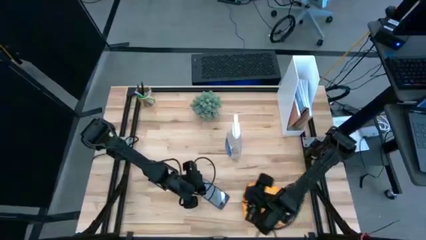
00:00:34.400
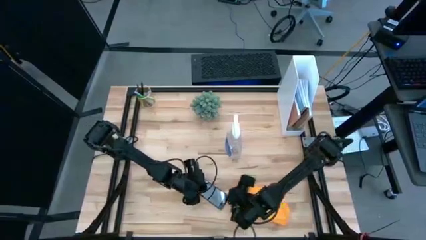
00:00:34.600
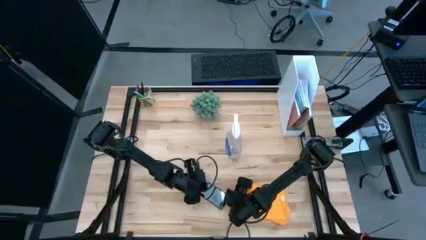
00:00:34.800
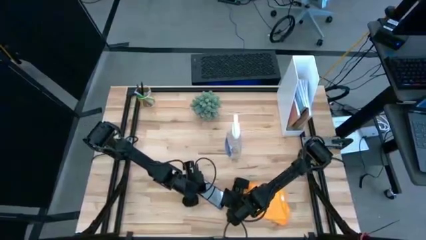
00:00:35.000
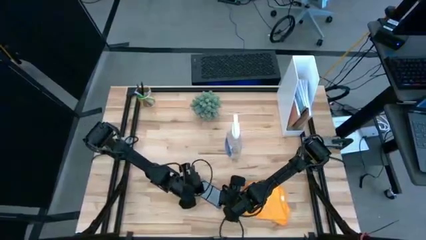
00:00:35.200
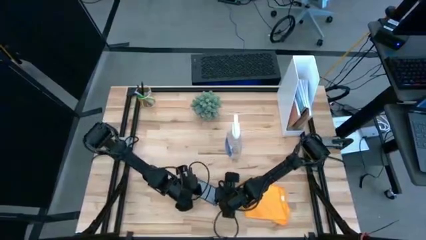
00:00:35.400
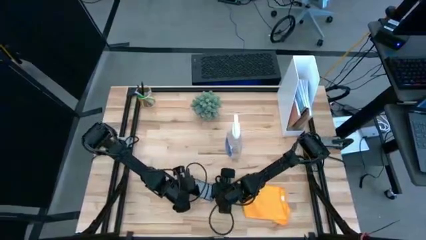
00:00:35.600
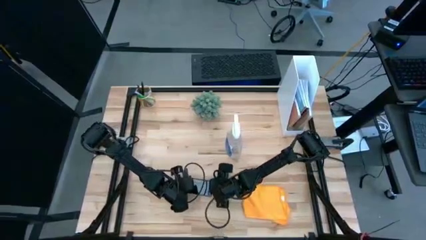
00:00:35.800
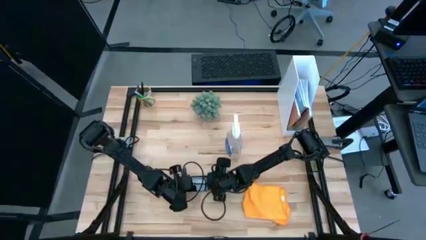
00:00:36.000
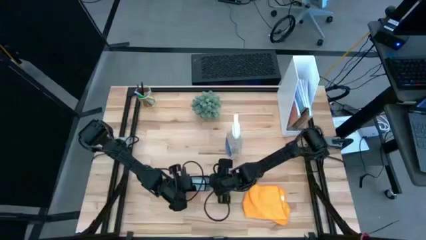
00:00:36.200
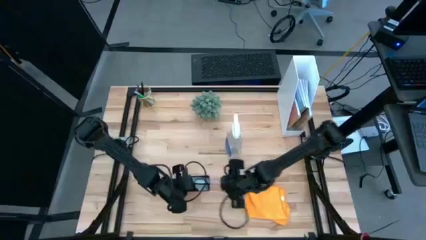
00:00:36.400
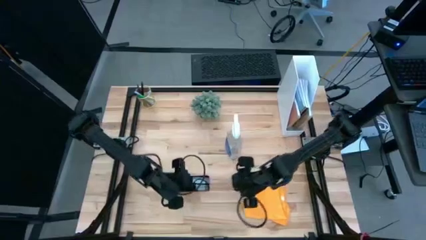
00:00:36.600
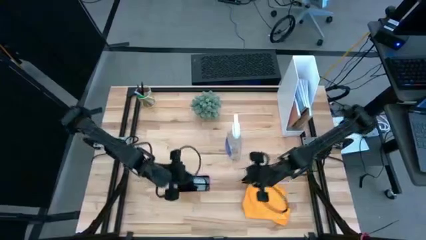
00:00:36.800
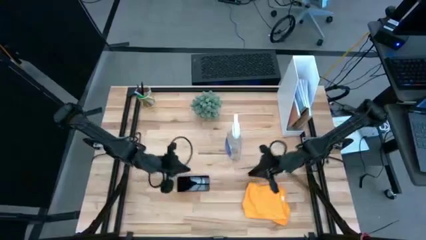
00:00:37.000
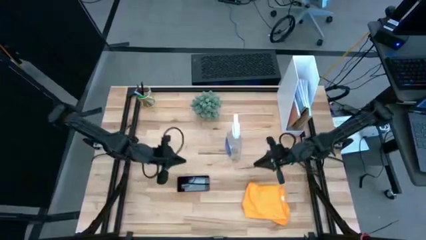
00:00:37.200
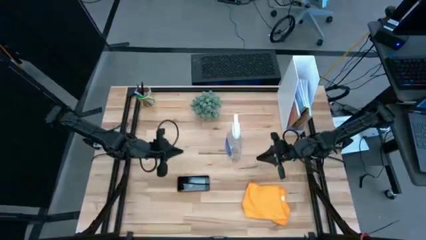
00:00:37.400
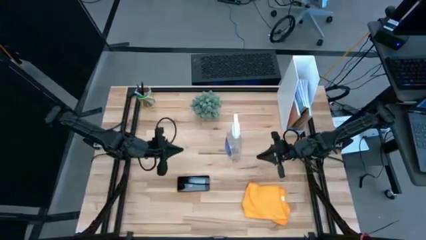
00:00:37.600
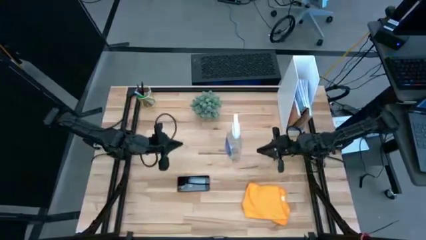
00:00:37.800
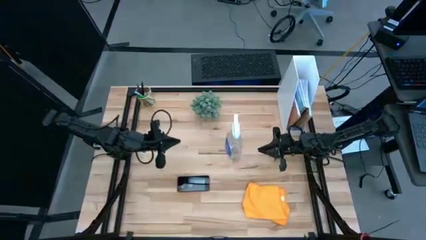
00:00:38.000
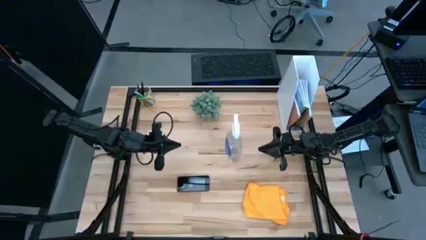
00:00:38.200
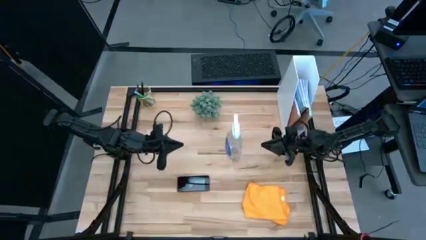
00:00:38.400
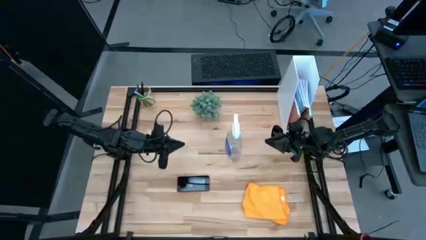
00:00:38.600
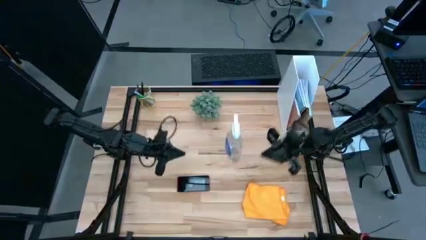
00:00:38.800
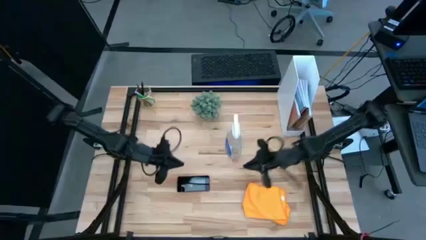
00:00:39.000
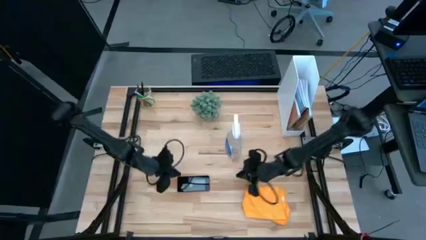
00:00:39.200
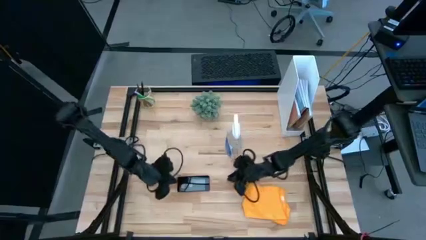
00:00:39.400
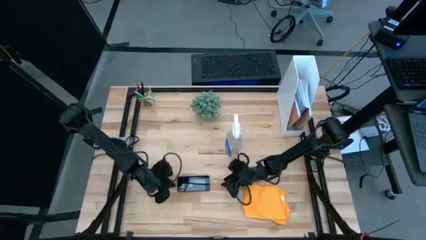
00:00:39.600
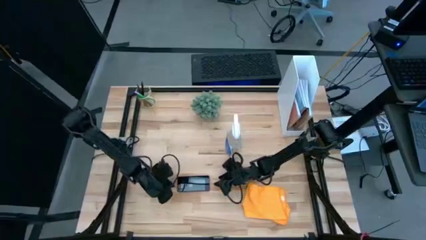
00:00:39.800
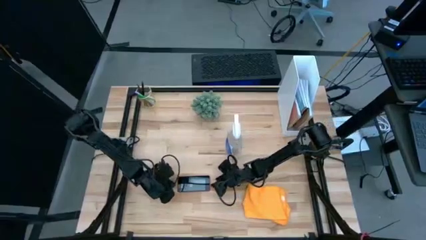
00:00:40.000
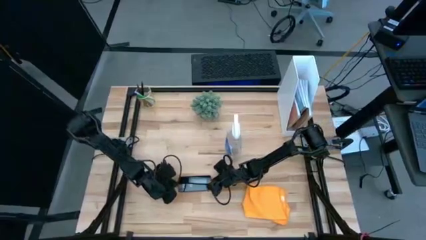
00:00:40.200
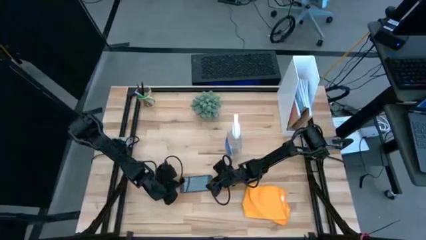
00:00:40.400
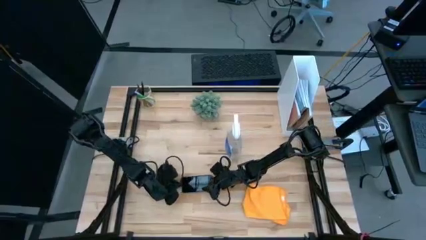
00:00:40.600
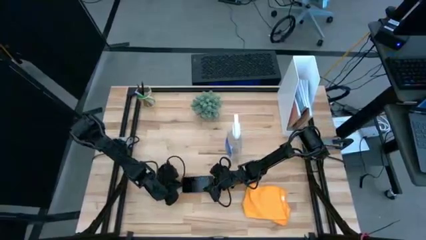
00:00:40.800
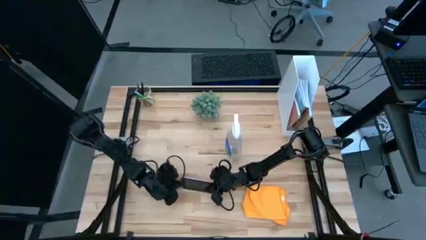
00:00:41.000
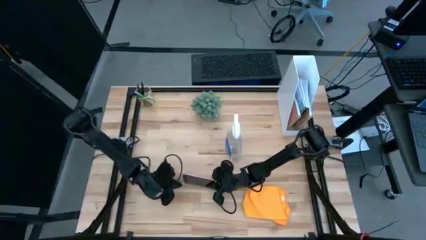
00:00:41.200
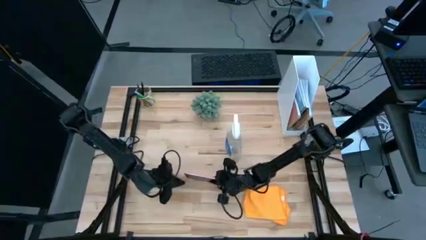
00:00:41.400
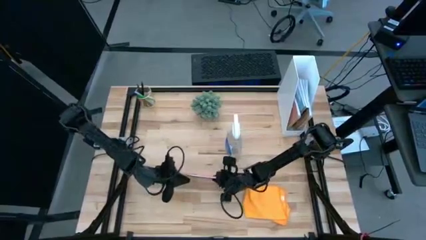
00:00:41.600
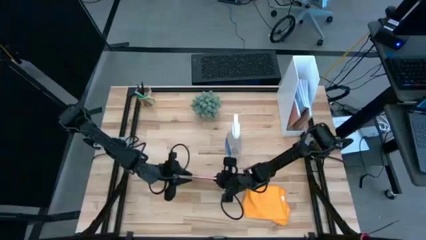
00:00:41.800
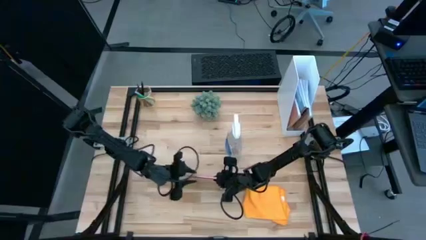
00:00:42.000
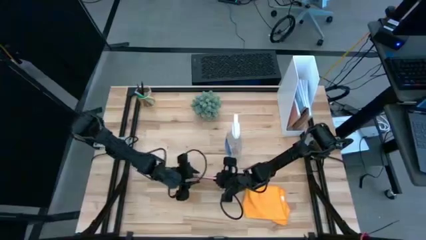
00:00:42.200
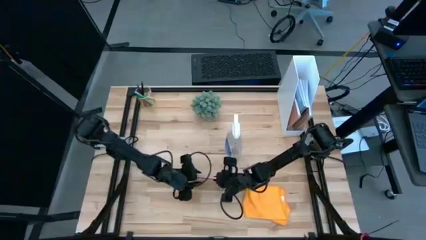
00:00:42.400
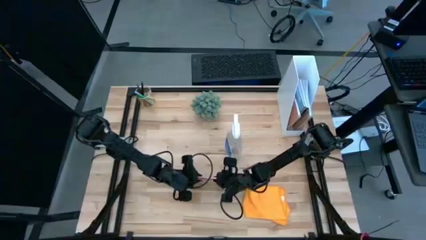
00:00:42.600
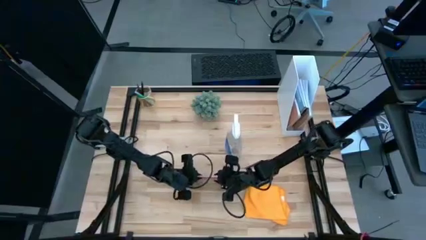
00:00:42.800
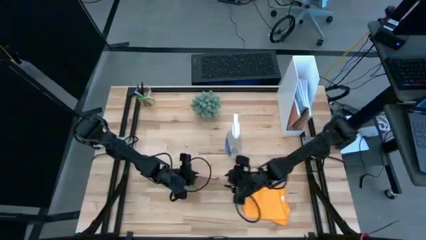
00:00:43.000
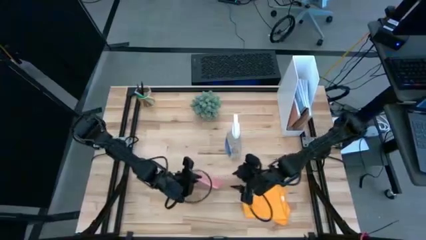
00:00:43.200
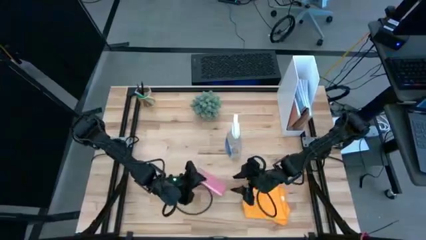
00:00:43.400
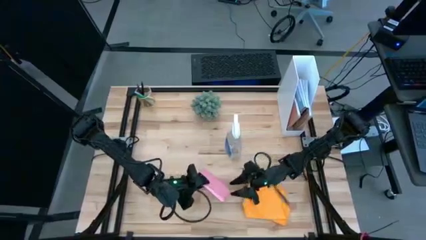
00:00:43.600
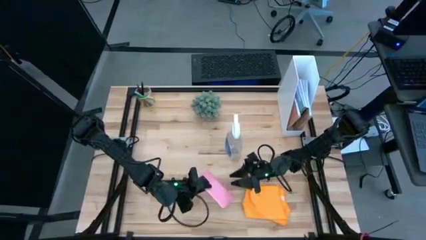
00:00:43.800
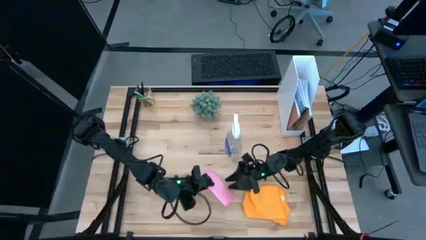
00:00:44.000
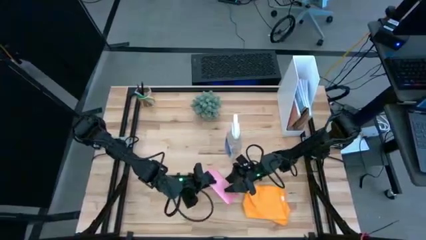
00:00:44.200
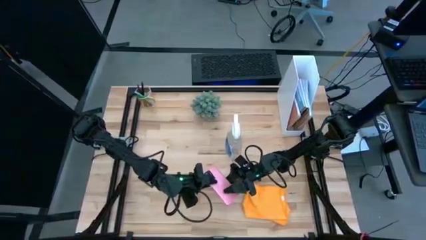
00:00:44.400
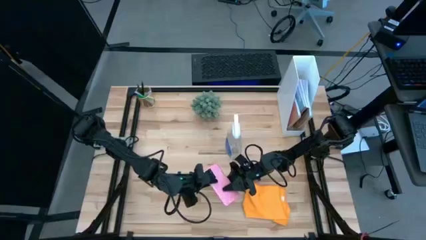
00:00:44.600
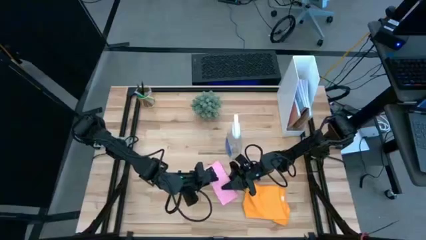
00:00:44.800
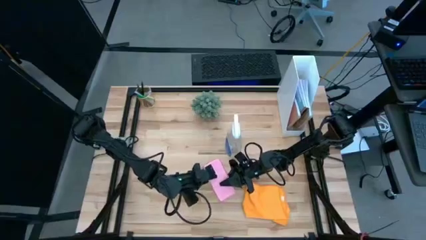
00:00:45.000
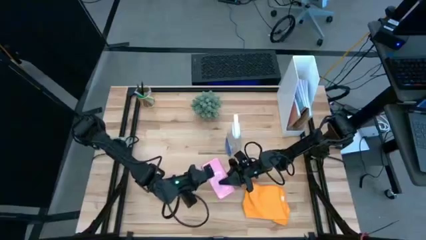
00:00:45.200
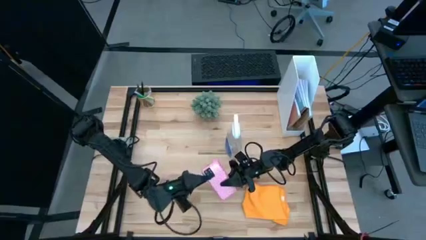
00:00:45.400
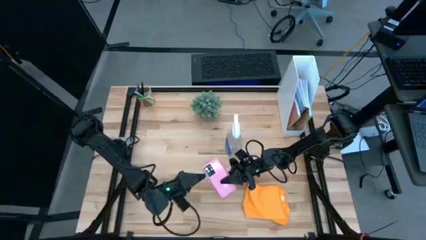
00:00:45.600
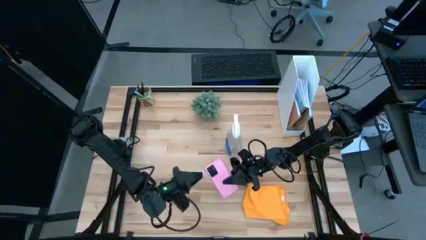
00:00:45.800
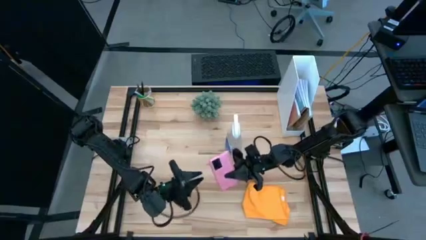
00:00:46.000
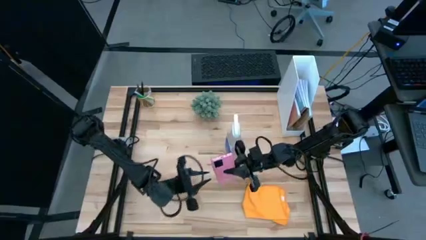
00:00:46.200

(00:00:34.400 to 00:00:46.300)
Task: Apply microfiber cloth
Spray cleaner from the bottle onto the cellphone
